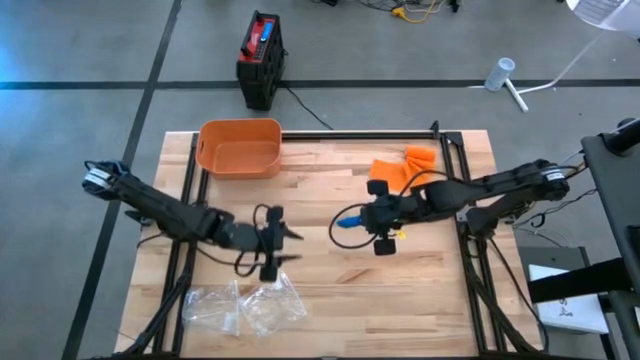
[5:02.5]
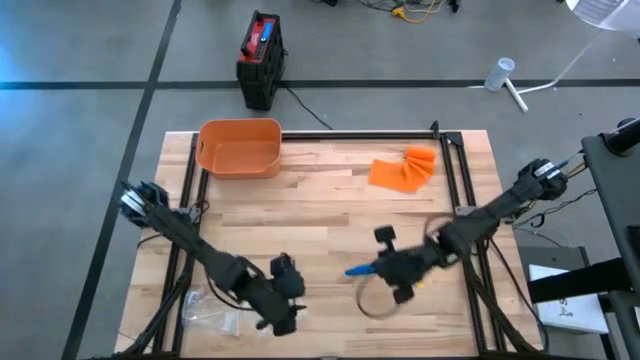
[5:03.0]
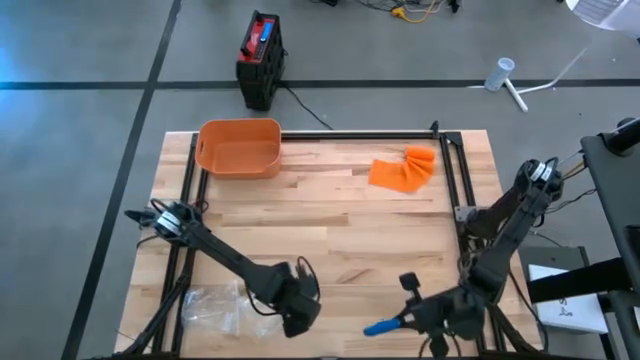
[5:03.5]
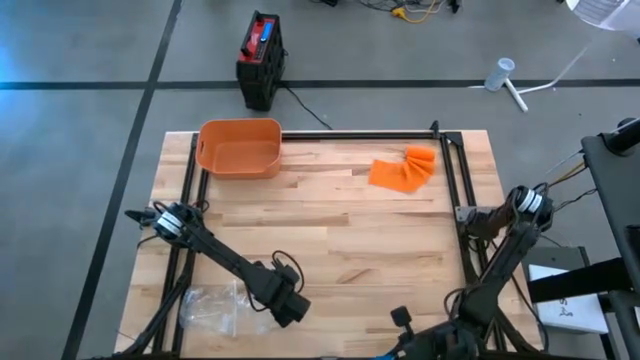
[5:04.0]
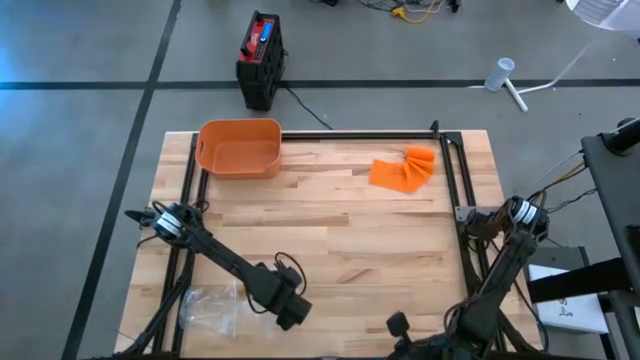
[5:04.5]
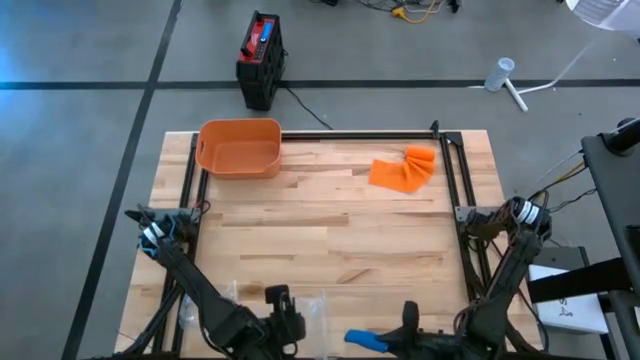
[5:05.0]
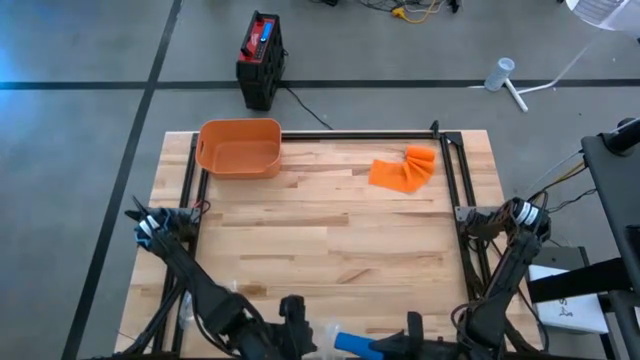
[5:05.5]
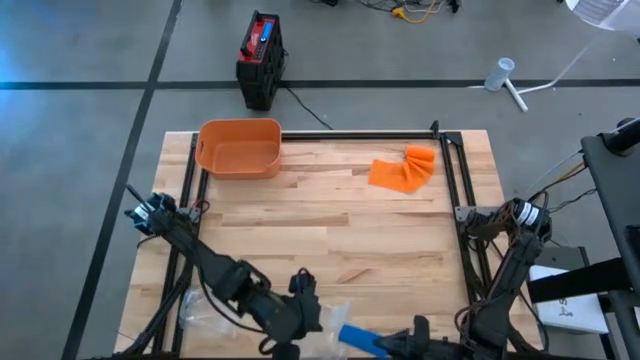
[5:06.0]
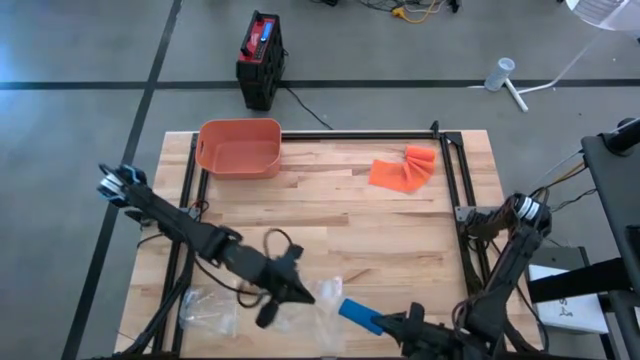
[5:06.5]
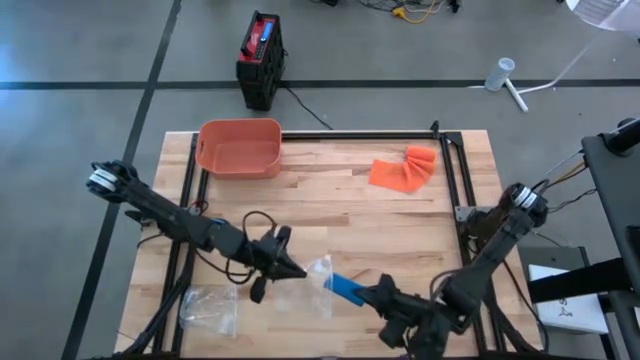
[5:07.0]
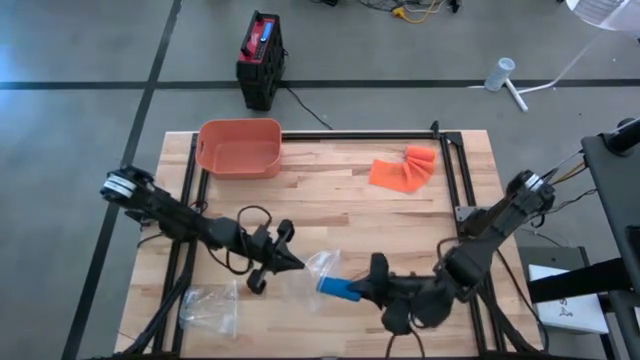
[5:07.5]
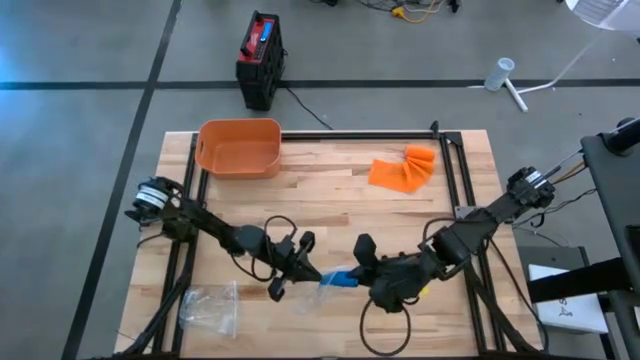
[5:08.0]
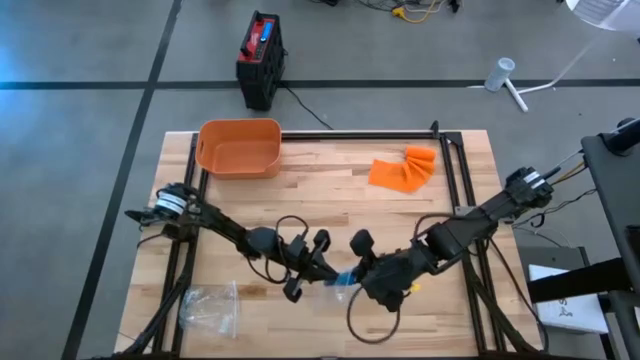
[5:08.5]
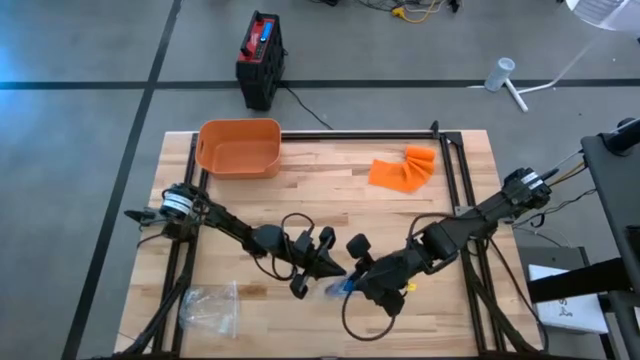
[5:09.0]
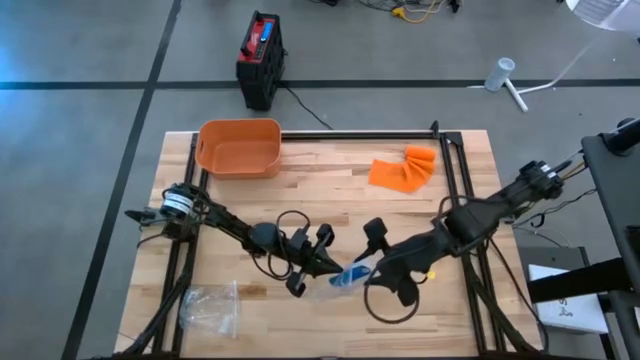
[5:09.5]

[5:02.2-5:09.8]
Task: Roll bandage
Put the rolled blue bandage into the transparent zip bag

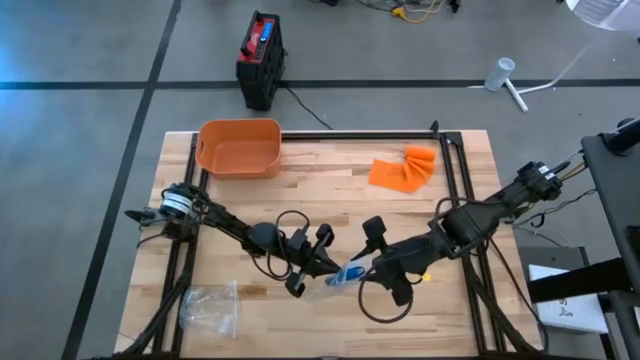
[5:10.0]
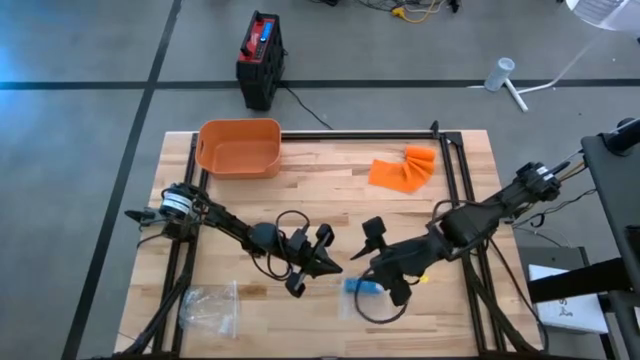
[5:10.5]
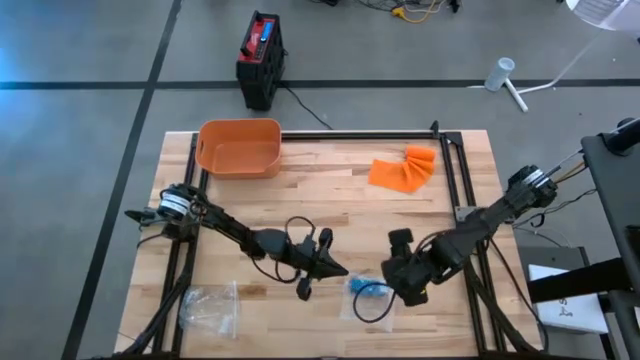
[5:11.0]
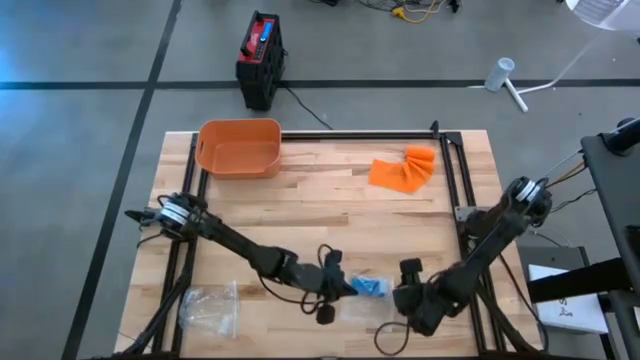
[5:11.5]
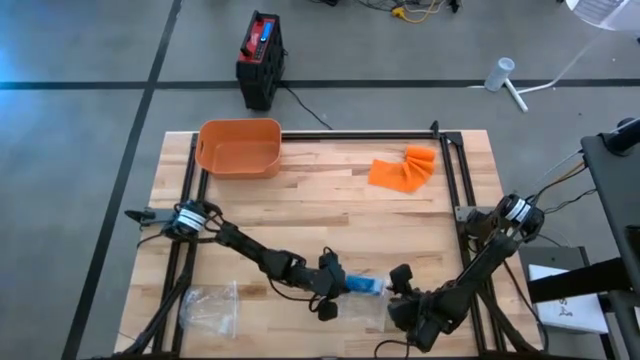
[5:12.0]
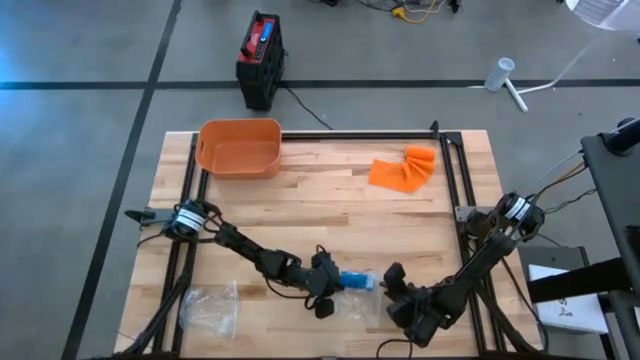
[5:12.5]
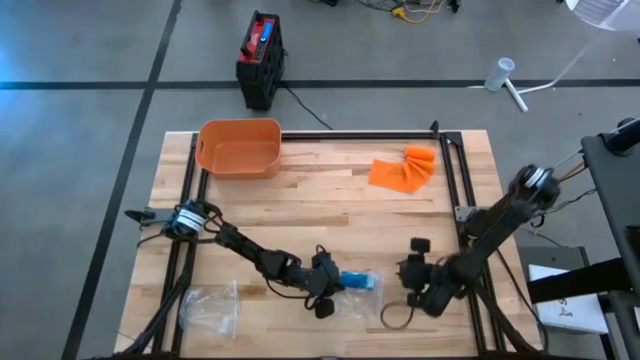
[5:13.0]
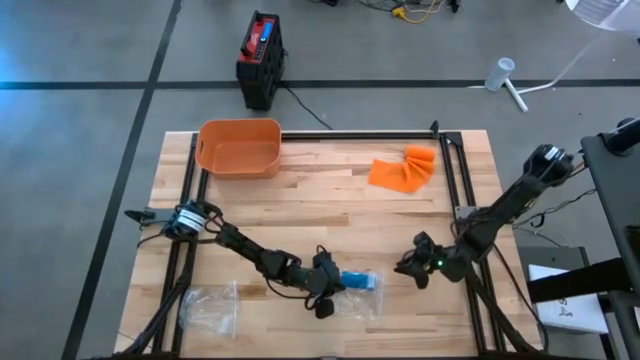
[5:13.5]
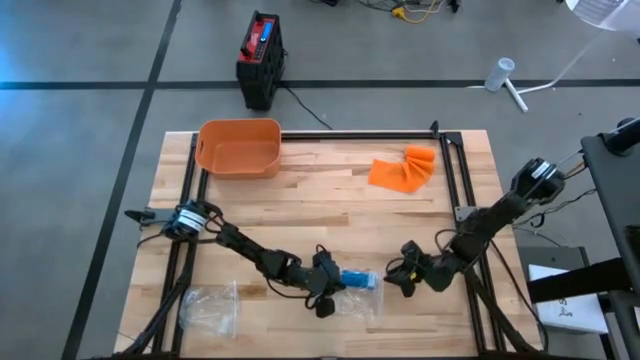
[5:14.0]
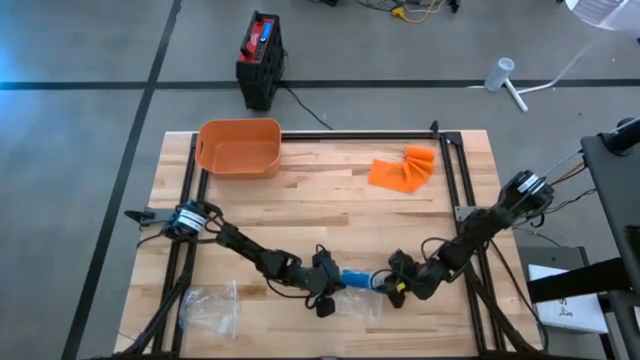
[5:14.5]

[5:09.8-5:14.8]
Put the transparent zip bag containing the rolled blue bandage into the orange bin

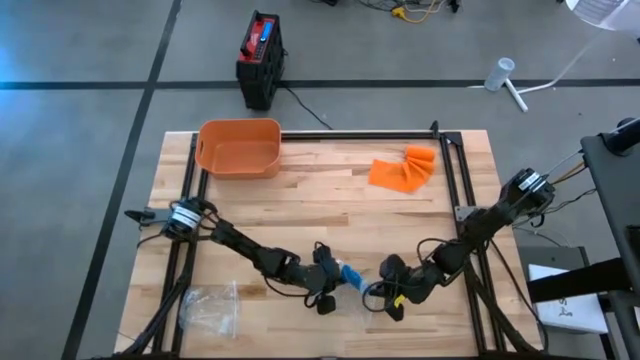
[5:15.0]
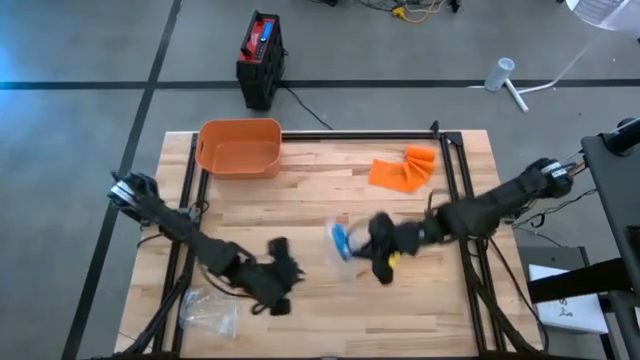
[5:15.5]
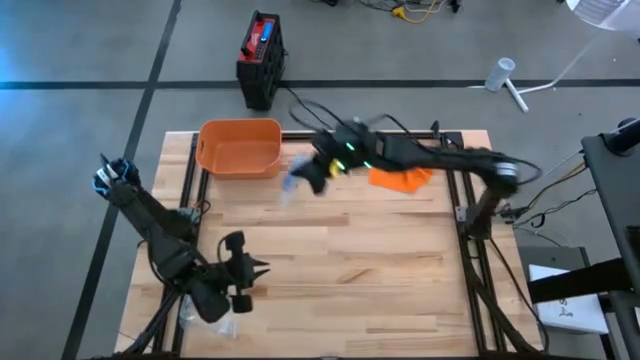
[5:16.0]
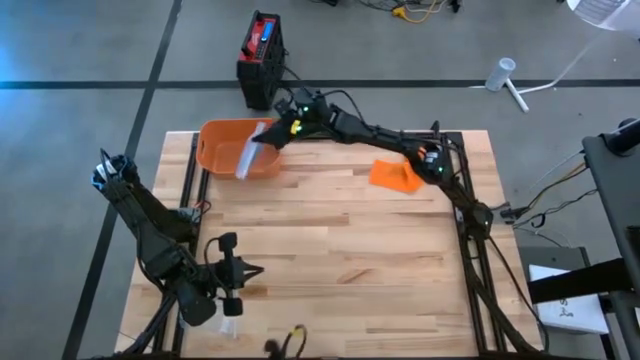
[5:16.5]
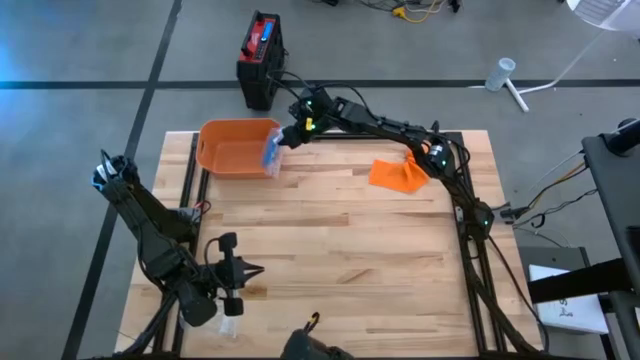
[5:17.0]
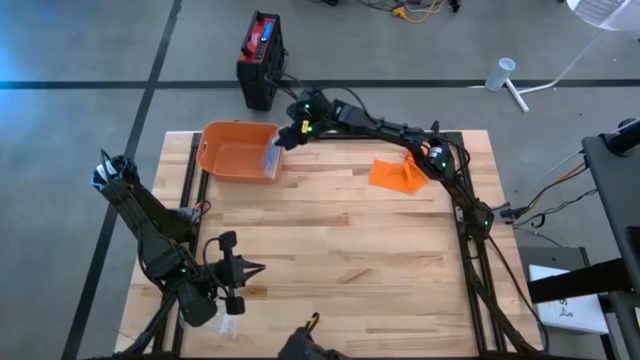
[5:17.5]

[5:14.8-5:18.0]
Put the transparent zip bag containing the rolled blue bandage into the orange bin

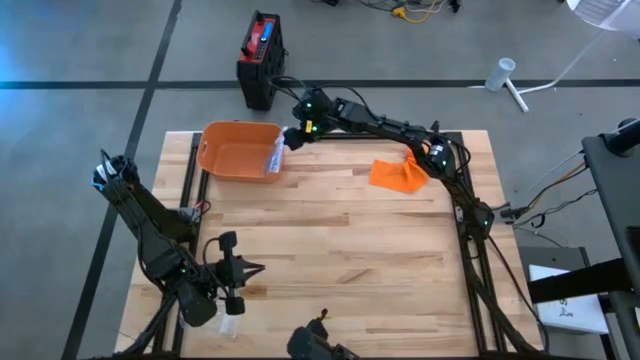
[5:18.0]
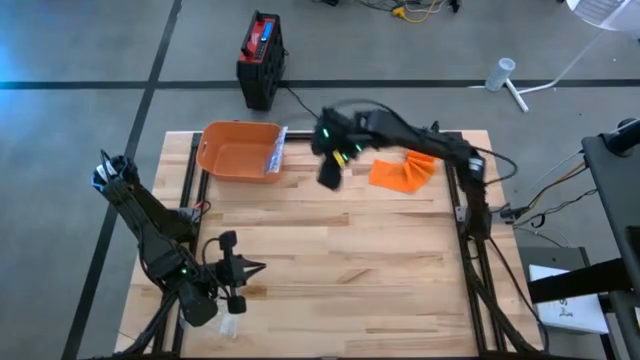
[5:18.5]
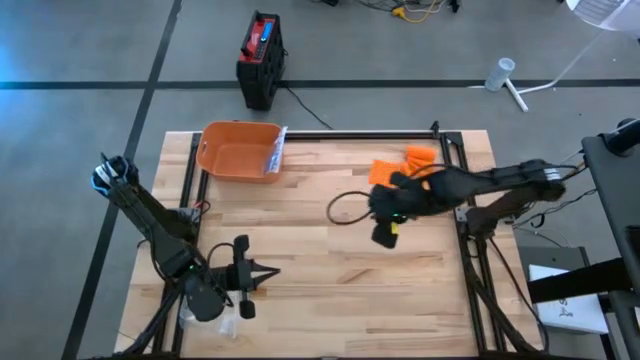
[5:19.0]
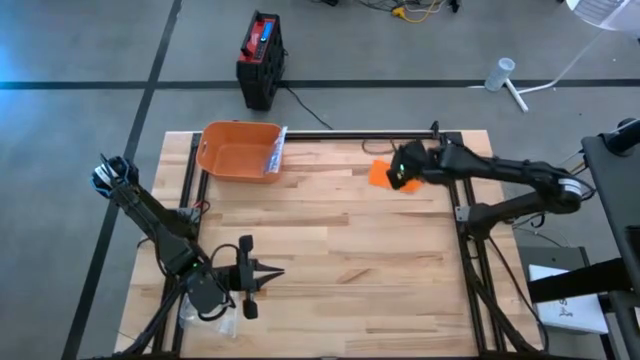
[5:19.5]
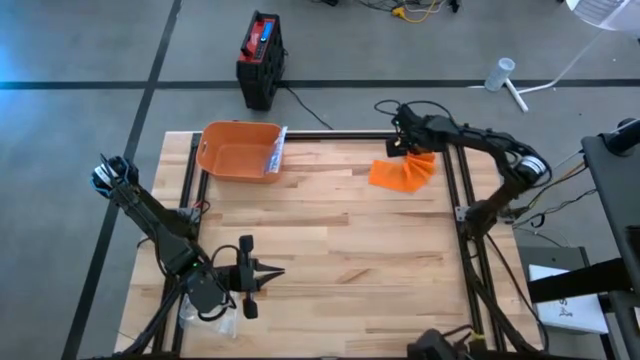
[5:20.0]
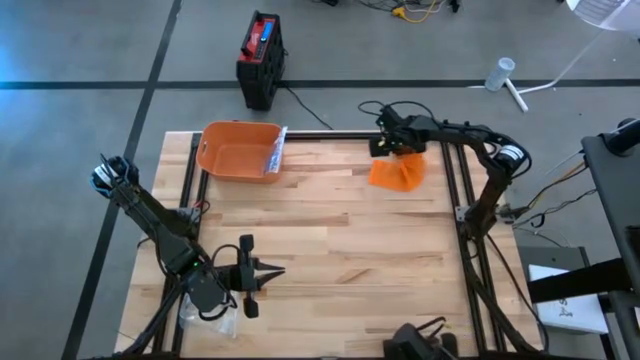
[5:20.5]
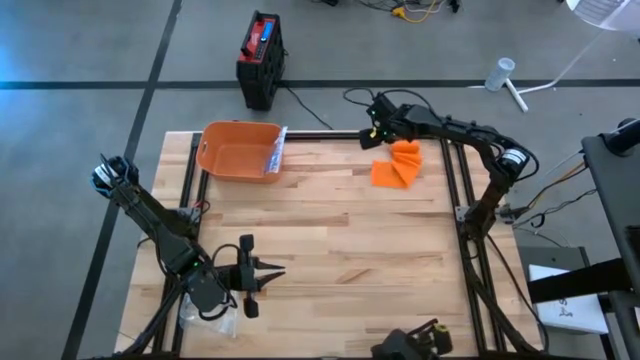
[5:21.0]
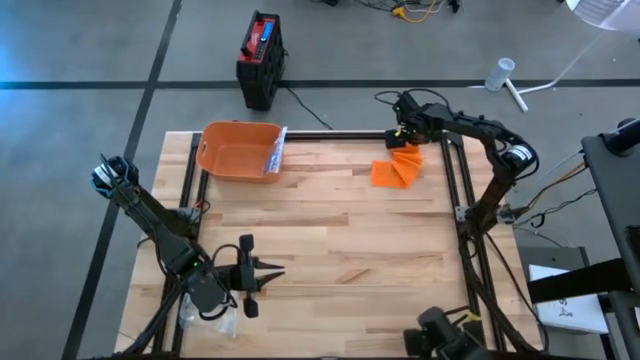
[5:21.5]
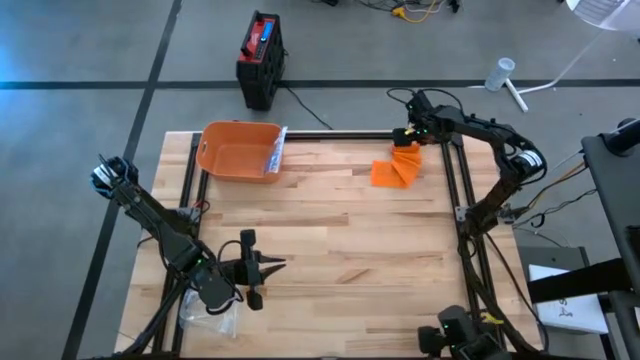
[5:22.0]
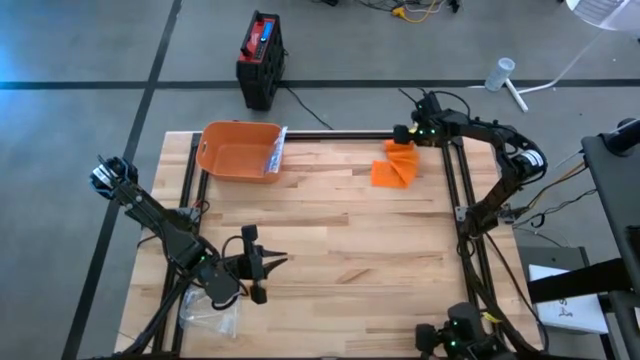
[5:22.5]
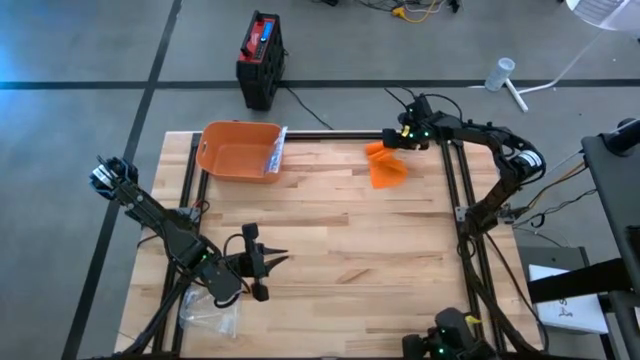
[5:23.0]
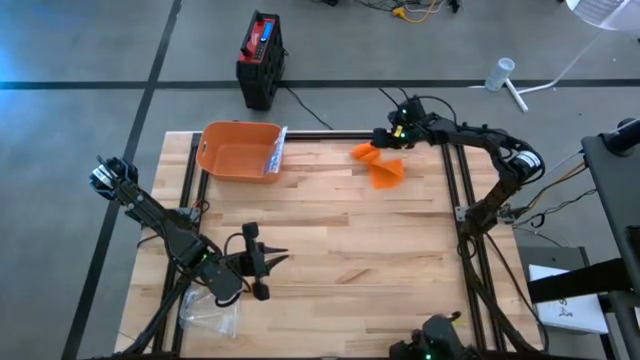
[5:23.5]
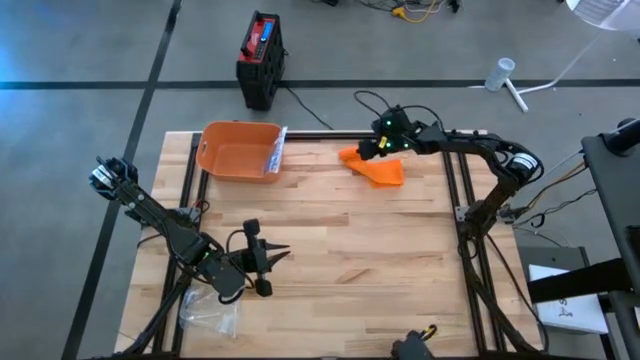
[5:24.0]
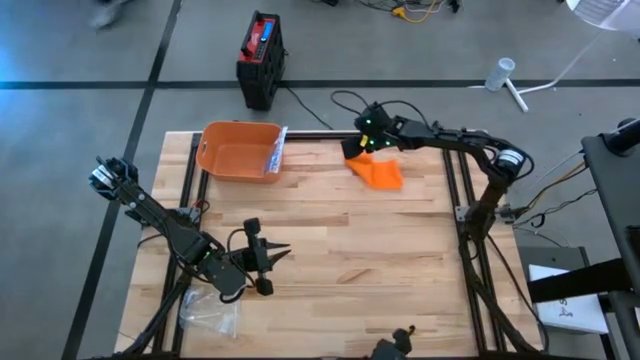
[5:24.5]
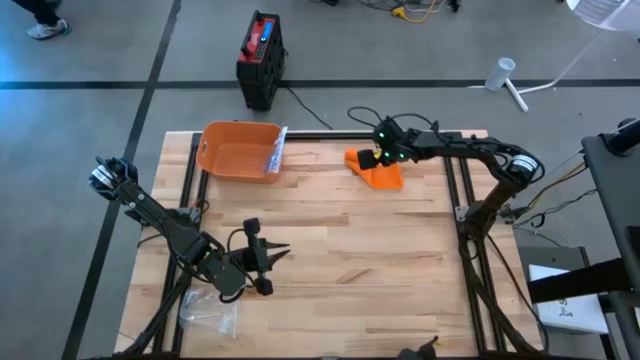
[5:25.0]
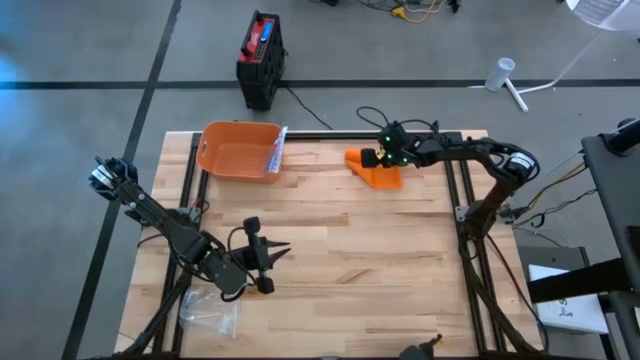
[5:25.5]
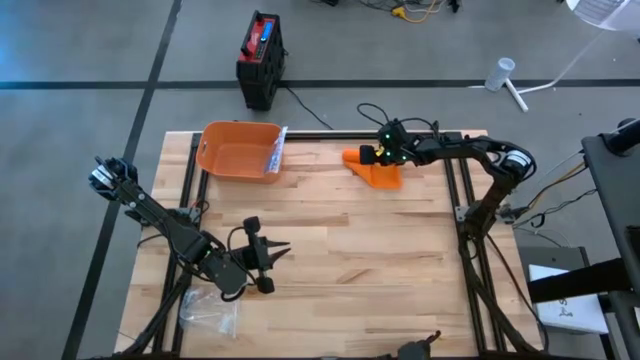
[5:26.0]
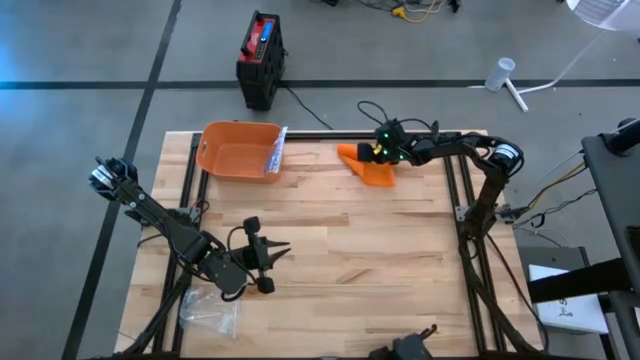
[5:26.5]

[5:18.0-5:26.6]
Roll the orange bandage
